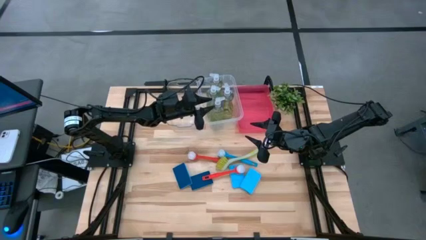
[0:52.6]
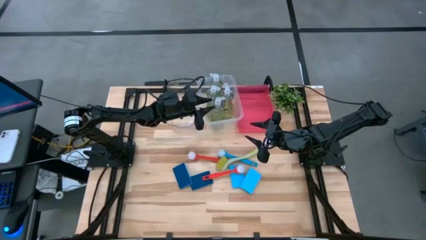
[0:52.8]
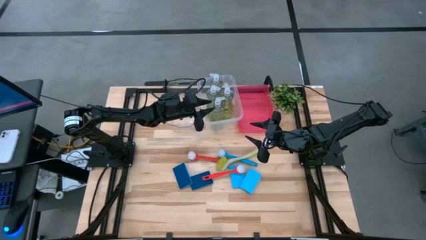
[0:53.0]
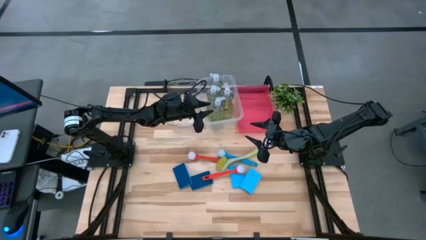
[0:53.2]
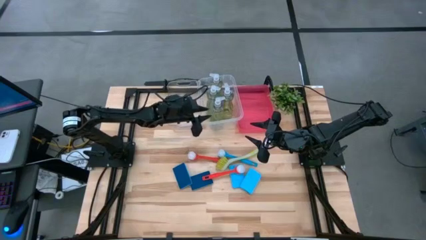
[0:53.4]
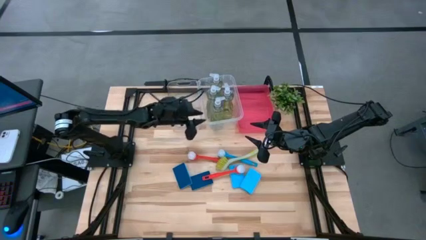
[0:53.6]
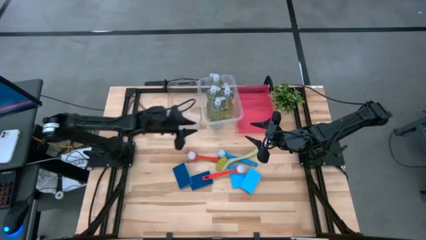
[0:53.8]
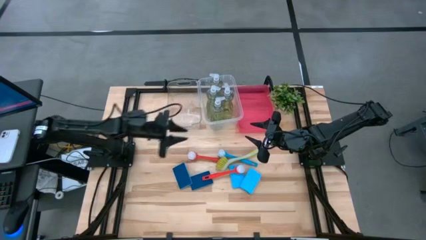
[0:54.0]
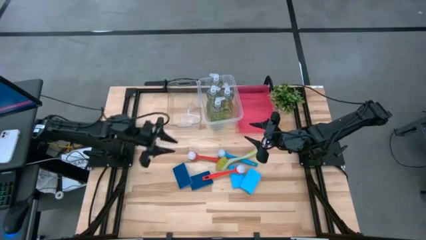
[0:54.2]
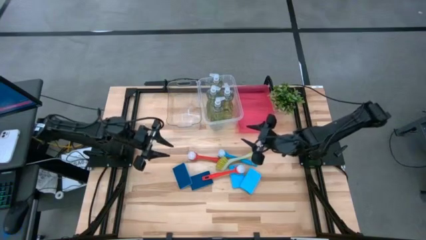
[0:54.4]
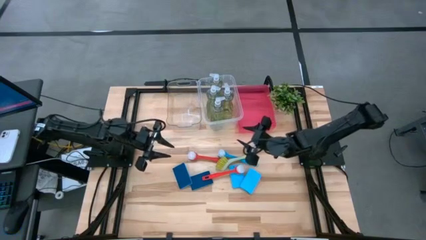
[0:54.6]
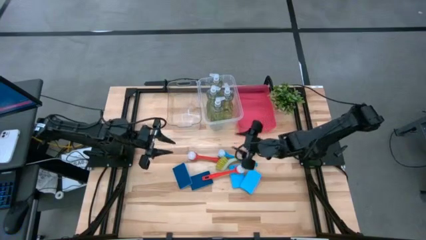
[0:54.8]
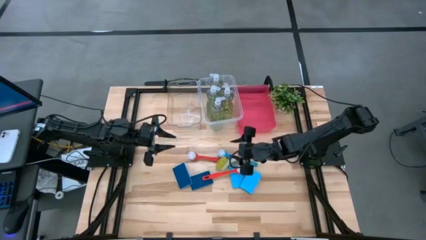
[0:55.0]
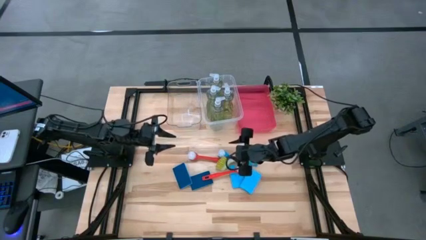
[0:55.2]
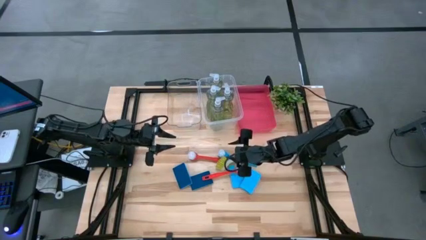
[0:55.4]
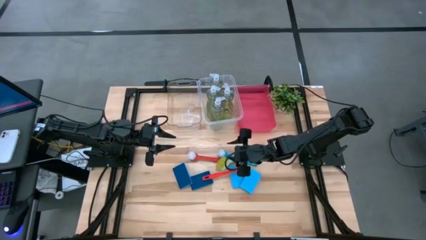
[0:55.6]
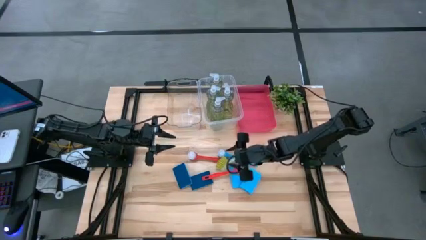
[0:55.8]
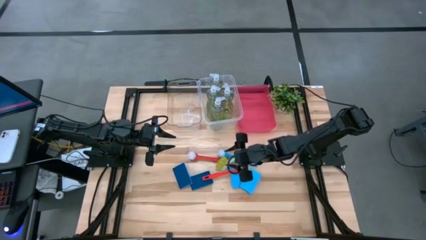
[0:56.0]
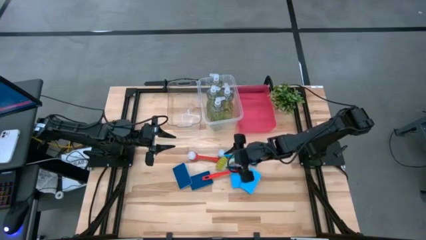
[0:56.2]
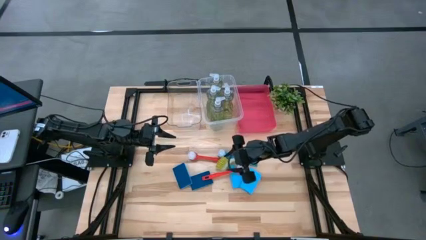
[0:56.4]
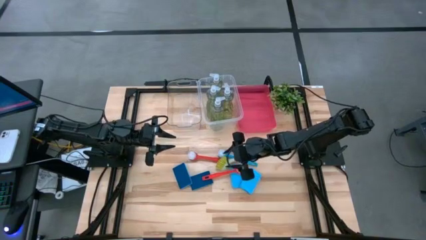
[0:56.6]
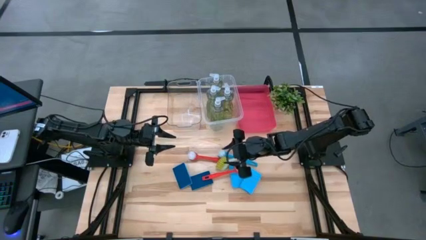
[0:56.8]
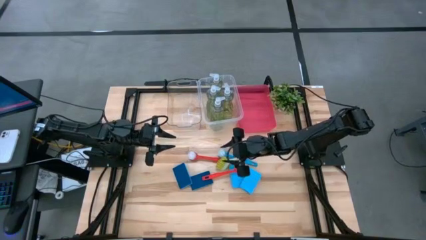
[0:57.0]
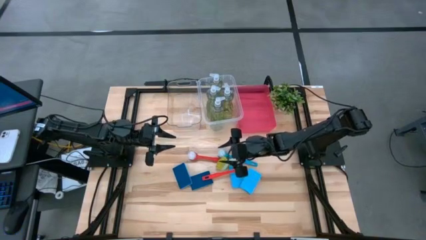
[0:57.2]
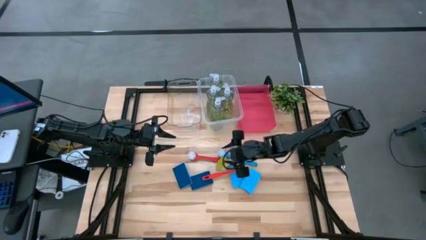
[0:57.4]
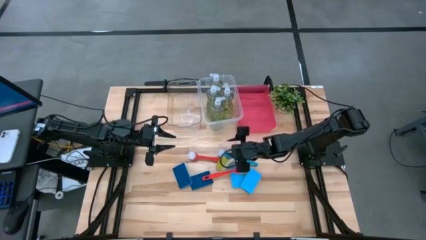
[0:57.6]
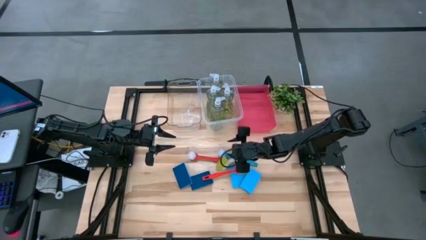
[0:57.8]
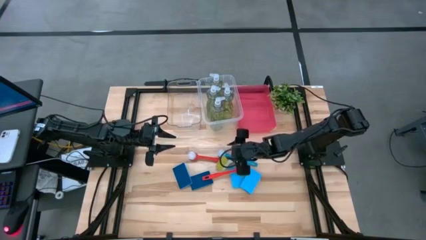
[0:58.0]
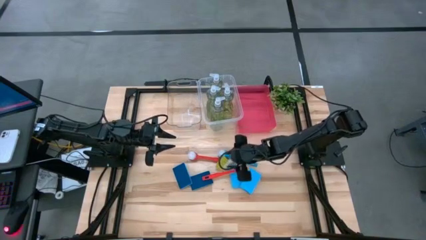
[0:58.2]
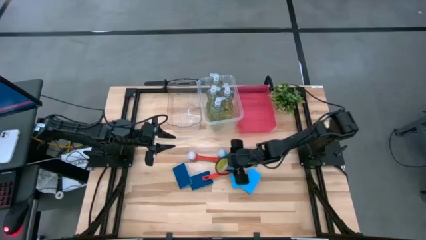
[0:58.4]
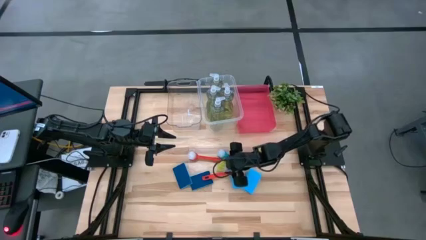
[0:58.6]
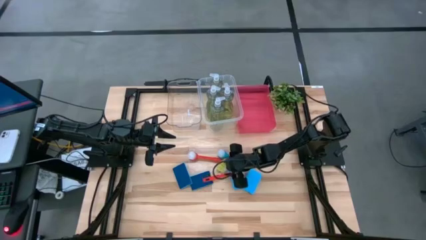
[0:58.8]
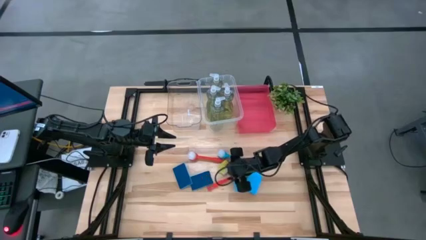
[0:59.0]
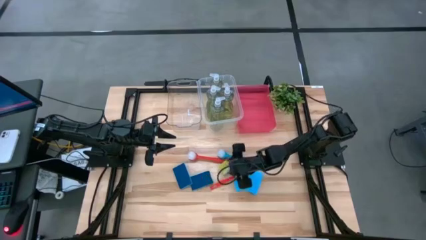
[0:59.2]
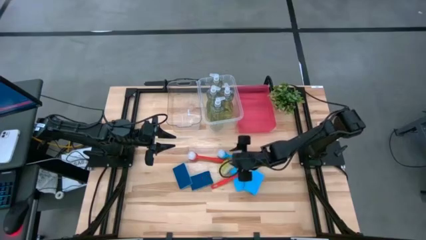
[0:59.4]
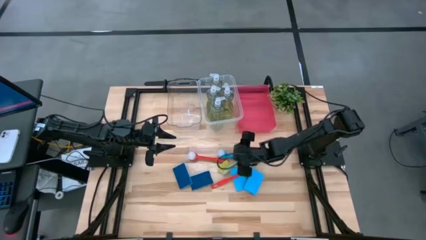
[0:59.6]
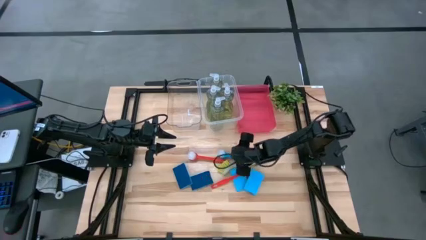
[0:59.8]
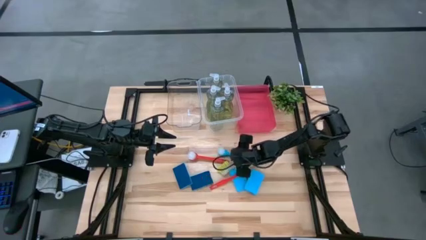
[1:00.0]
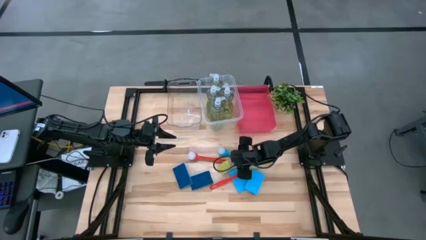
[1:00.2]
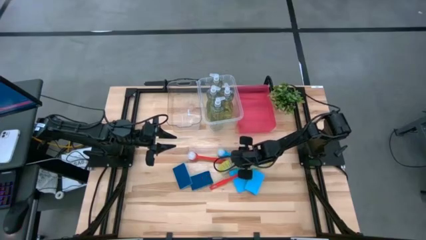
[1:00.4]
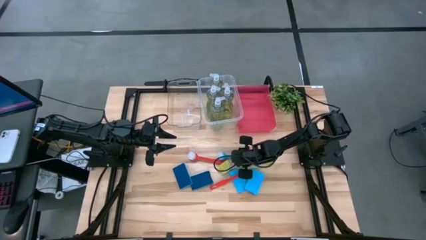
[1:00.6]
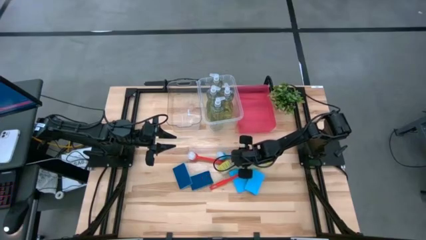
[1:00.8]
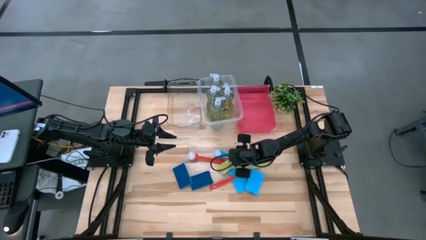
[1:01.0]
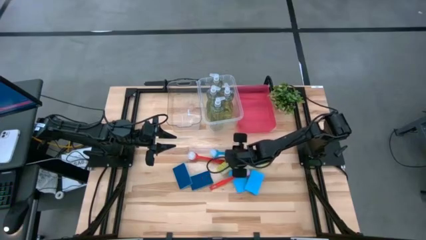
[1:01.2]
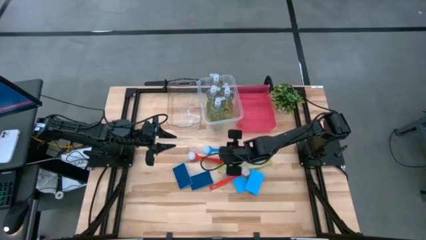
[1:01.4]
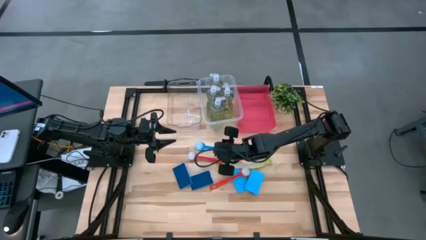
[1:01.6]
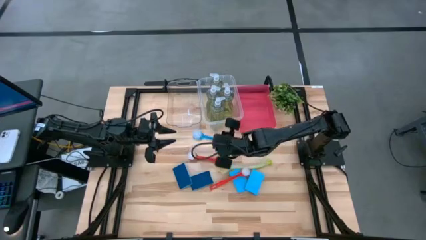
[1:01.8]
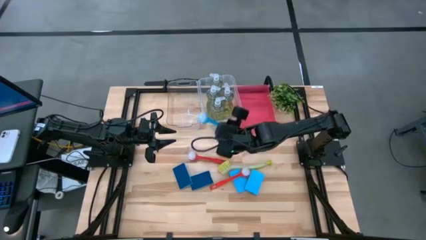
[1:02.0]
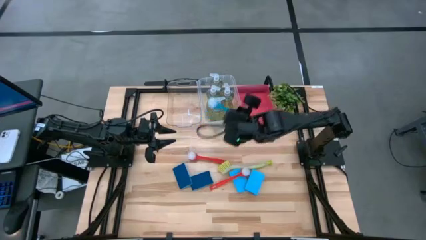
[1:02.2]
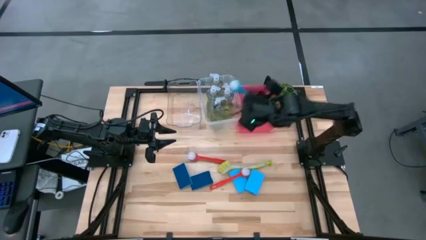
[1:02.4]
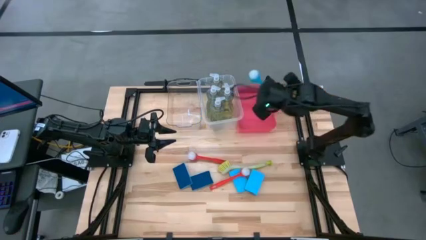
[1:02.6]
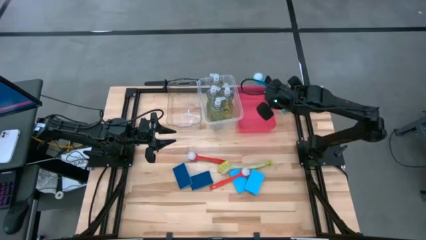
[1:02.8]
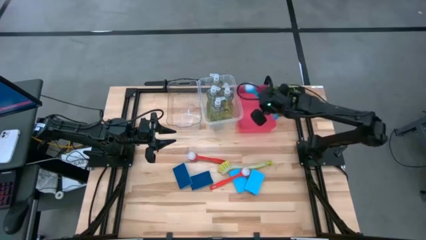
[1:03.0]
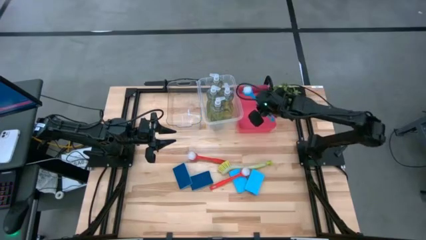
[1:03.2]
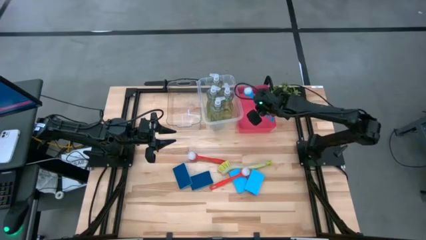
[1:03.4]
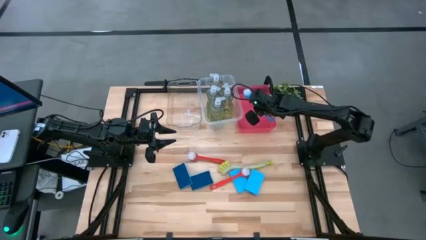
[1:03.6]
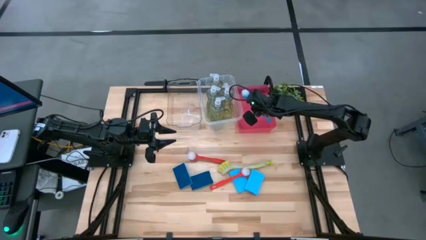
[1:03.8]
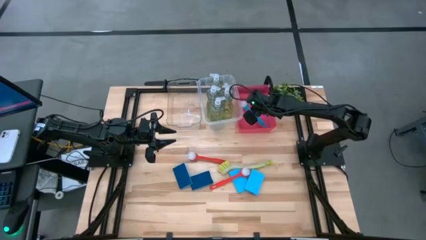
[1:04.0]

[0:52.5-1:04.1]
Task: Pick & Place Kitchen Sink Supplies
Put the blue dish brush into the pink bin

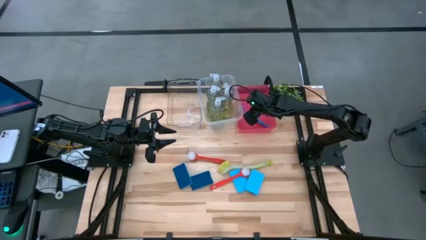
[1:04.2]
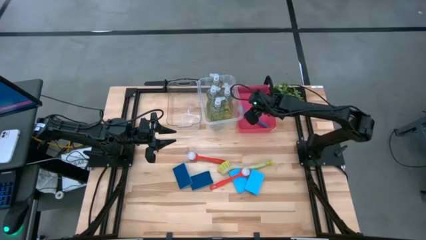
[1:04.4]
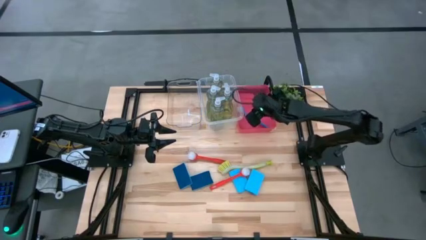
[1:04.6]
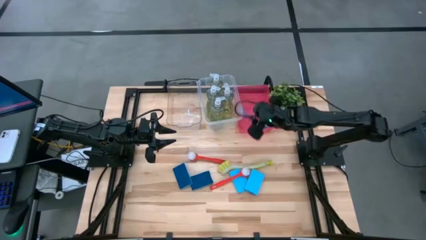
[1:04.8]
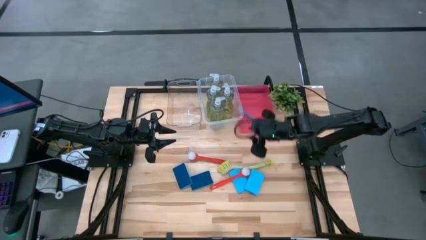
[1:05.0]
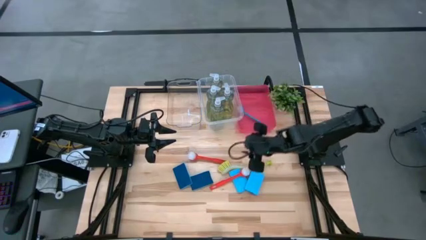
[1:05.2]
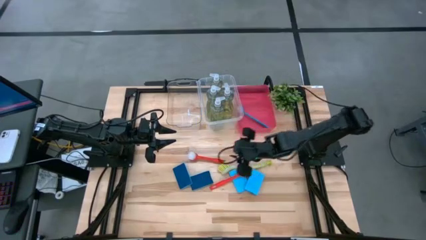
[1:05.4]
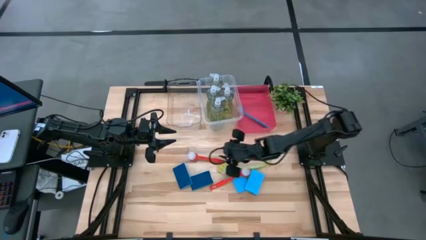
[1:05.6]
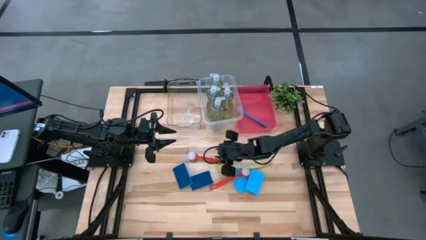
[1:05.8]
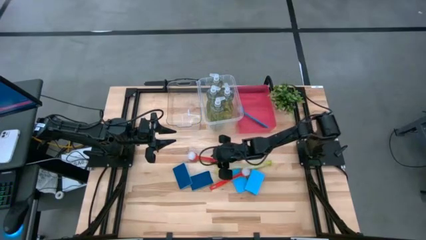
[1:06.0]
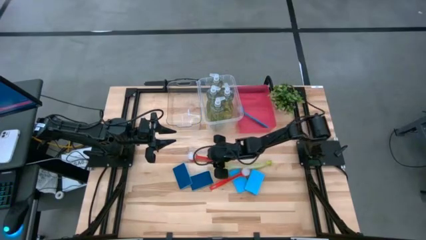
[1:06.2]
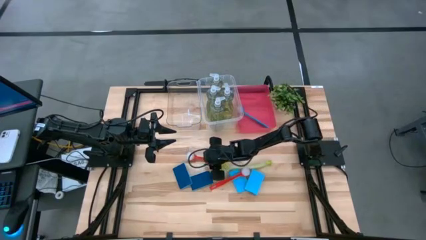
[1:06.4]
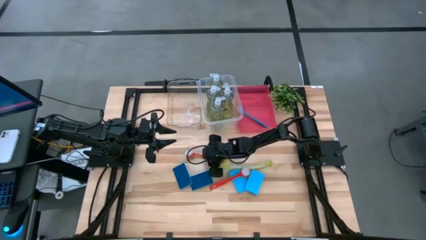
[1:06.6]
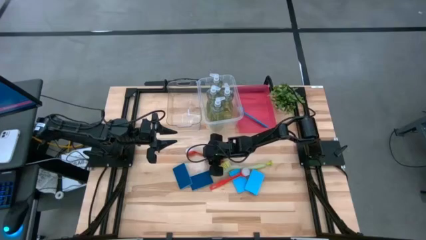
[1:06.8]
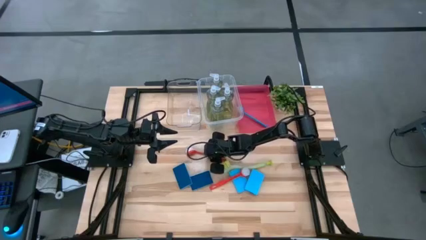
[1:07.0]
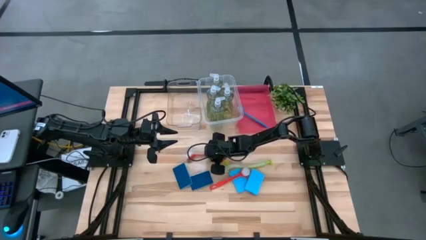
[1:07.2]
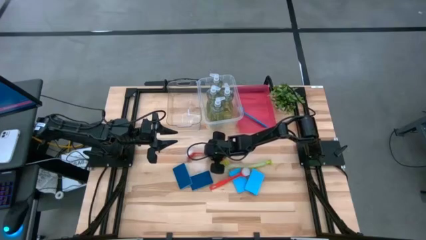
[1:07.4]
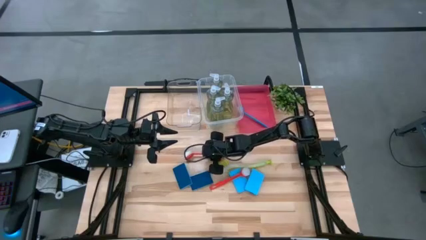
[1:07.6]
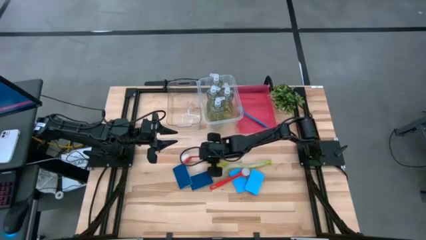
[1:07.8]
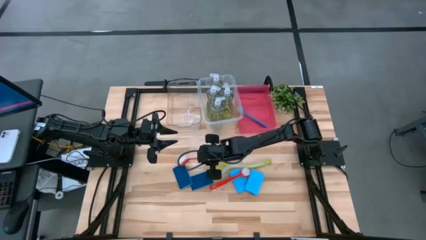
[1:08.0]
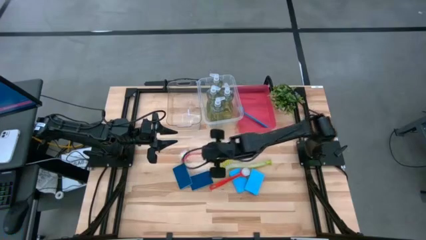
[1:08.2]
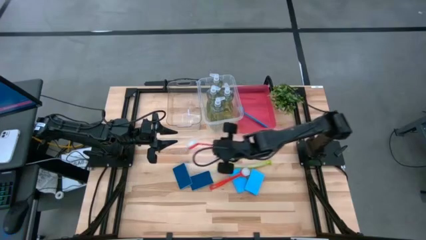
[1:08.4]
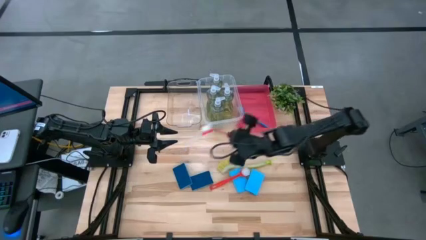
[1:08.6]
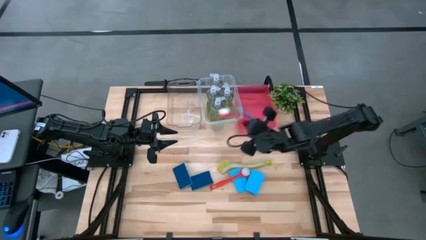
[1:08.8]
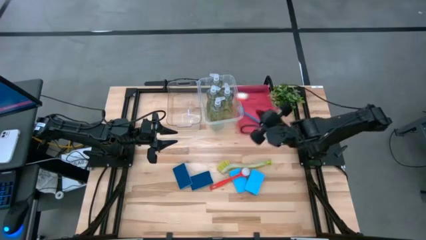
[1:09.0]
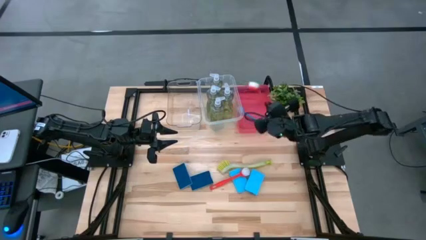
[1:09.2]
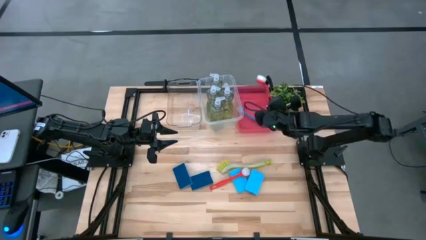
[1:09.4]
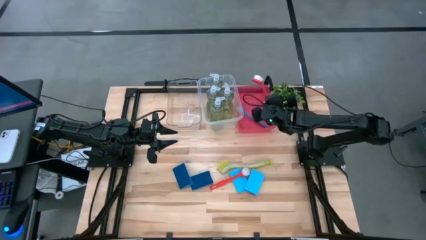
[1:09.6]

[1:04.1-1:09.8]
Put the orange dish brush into the pink bin
